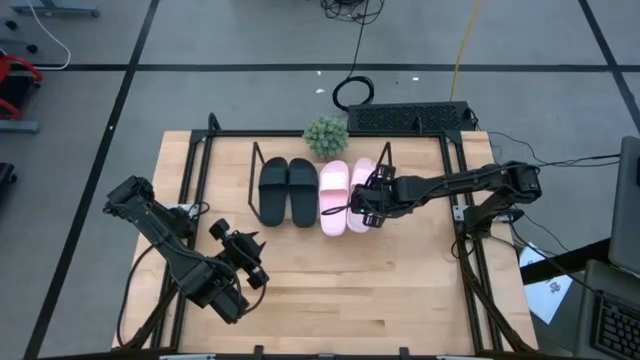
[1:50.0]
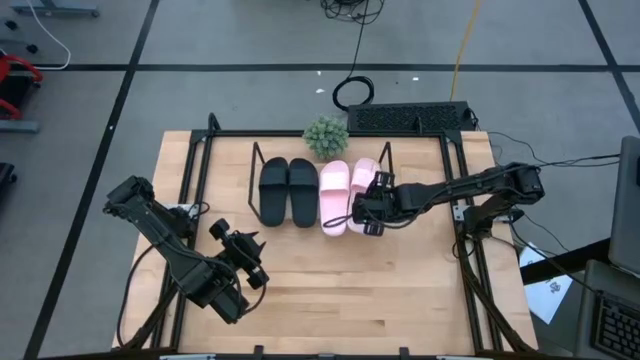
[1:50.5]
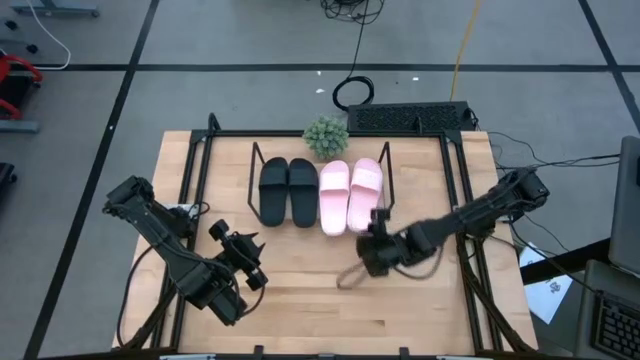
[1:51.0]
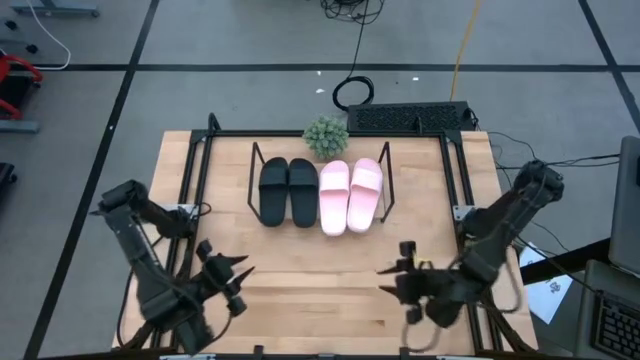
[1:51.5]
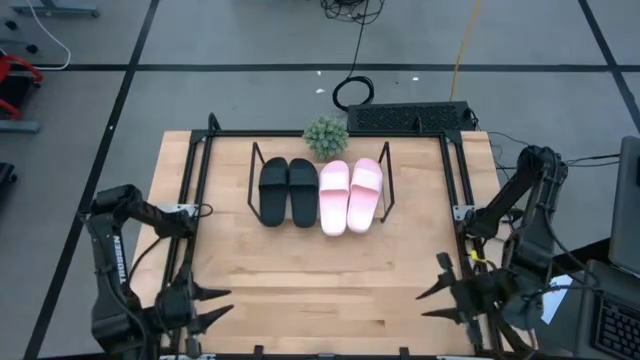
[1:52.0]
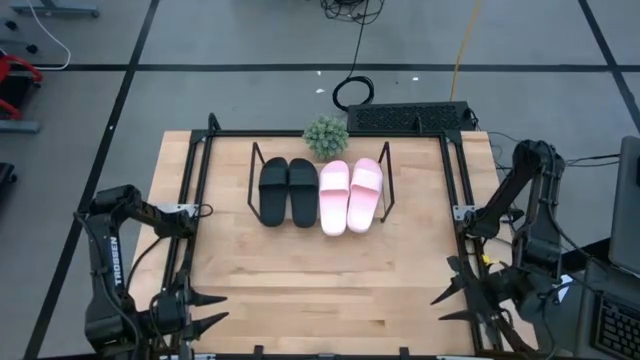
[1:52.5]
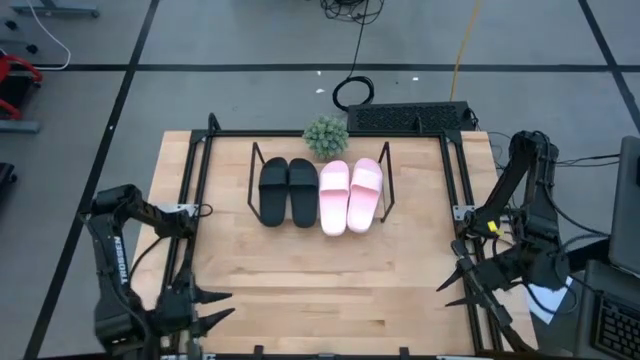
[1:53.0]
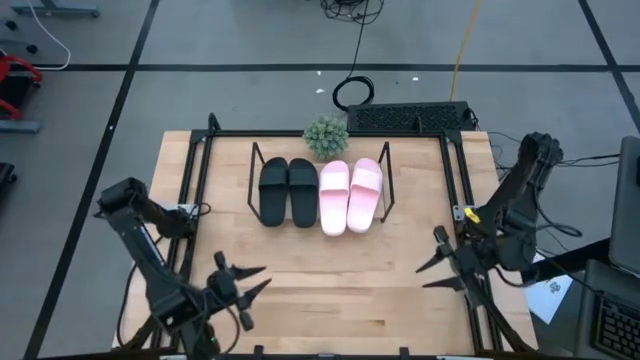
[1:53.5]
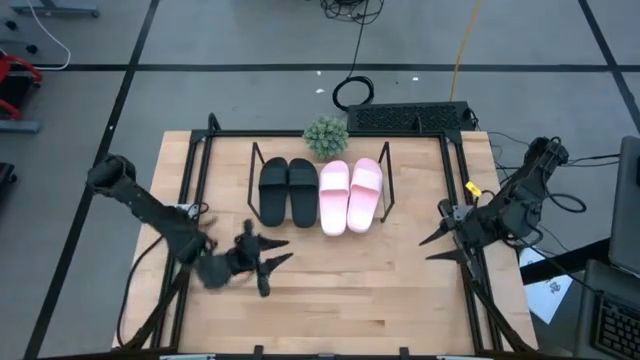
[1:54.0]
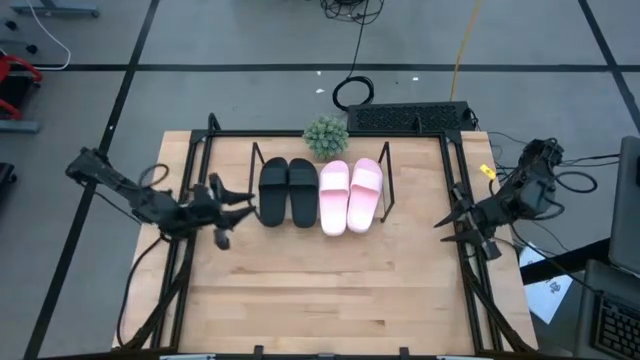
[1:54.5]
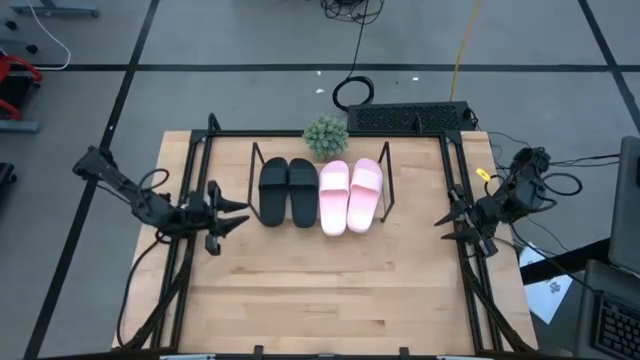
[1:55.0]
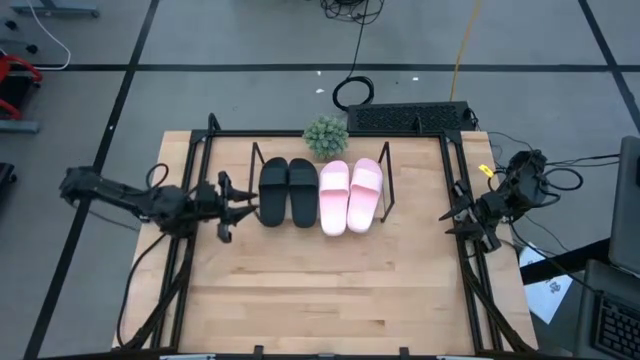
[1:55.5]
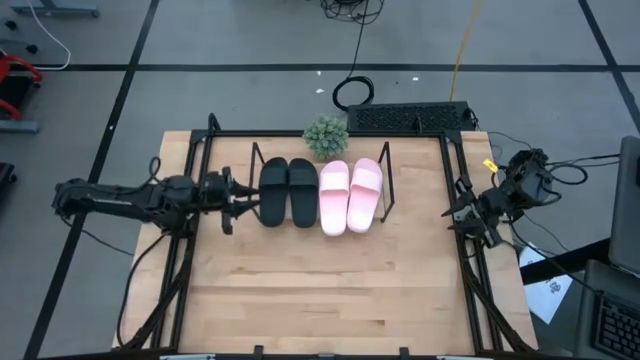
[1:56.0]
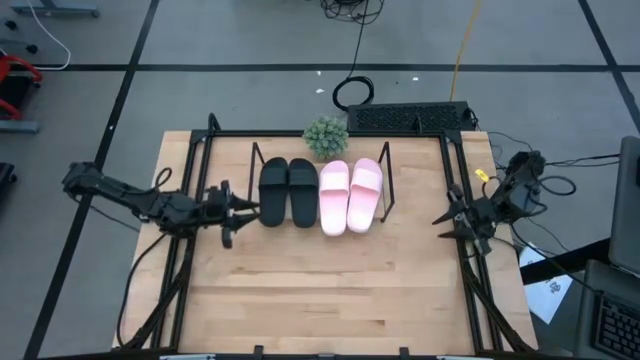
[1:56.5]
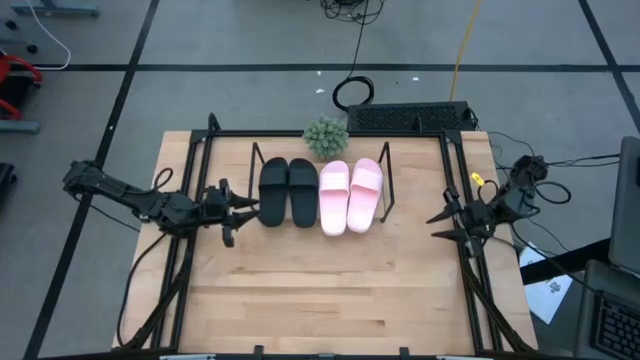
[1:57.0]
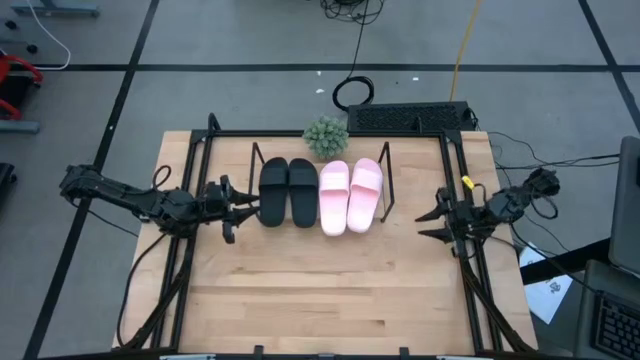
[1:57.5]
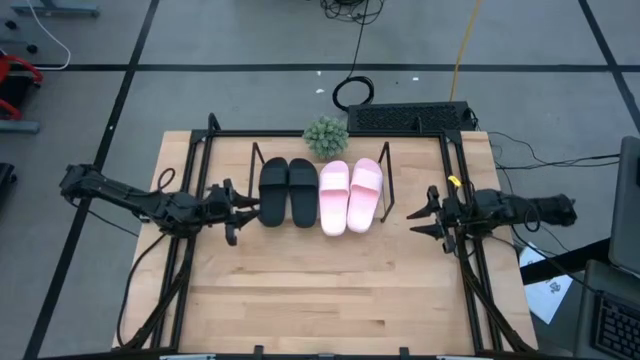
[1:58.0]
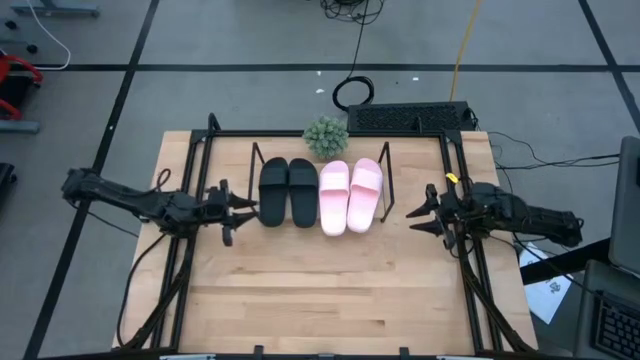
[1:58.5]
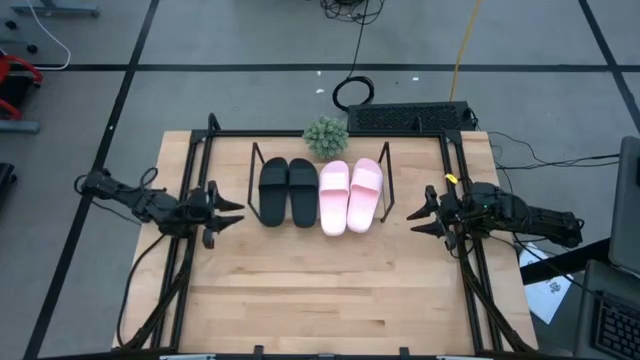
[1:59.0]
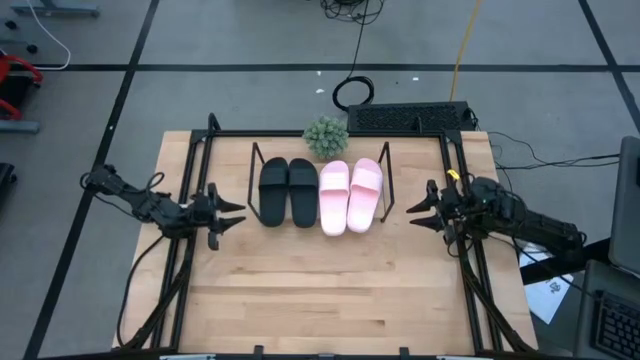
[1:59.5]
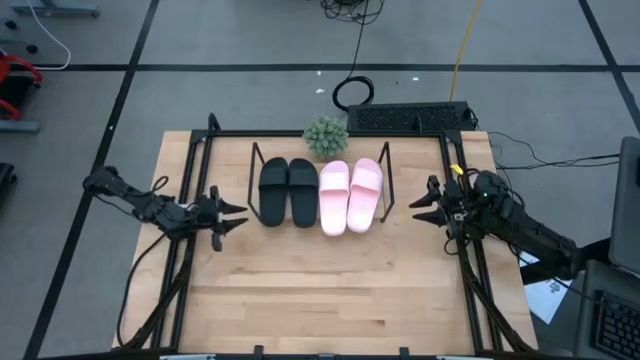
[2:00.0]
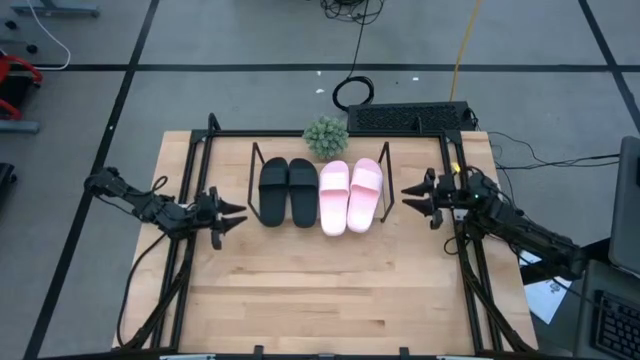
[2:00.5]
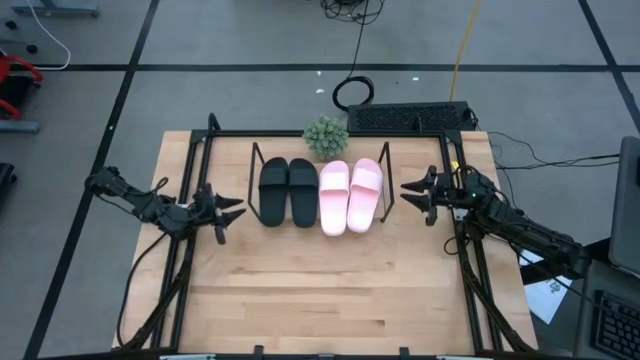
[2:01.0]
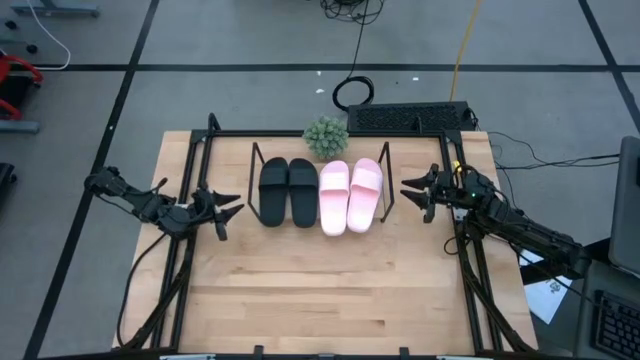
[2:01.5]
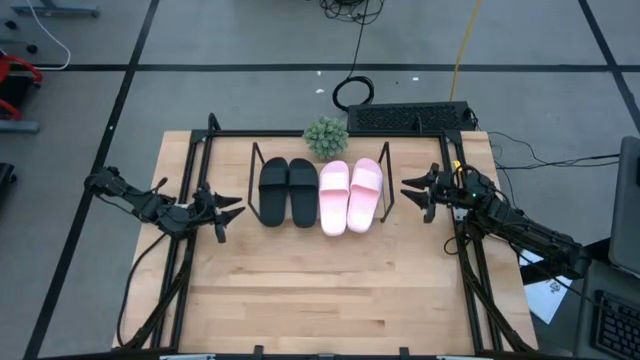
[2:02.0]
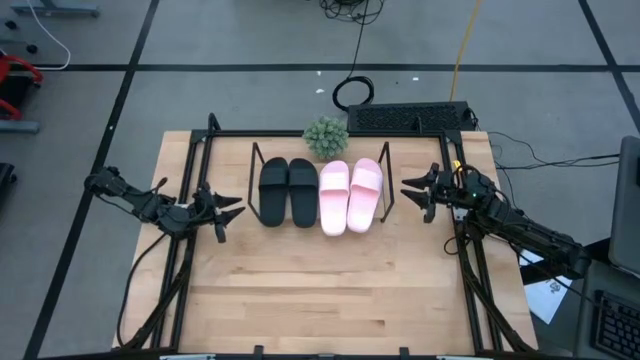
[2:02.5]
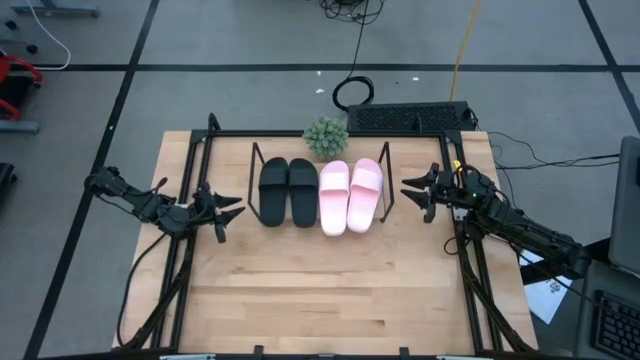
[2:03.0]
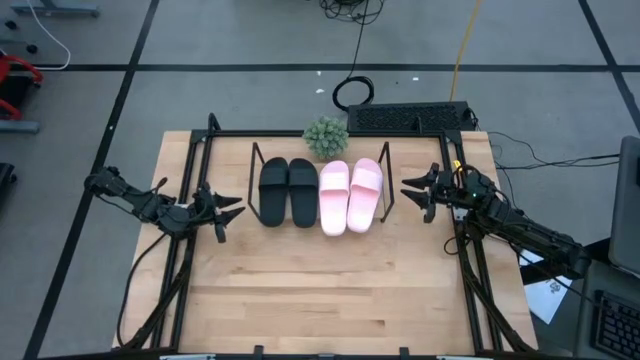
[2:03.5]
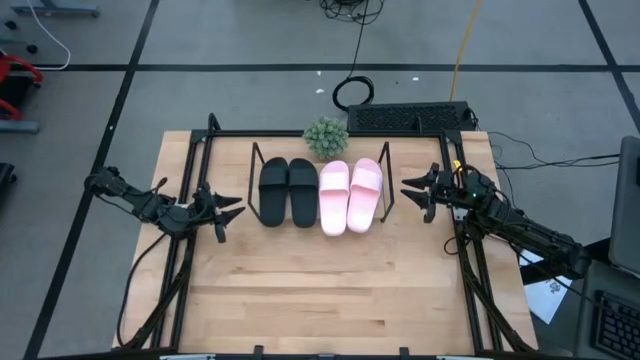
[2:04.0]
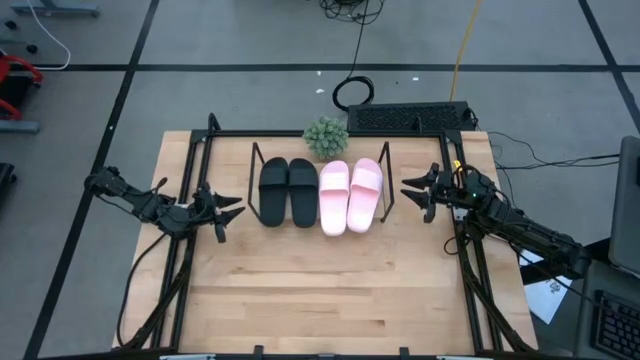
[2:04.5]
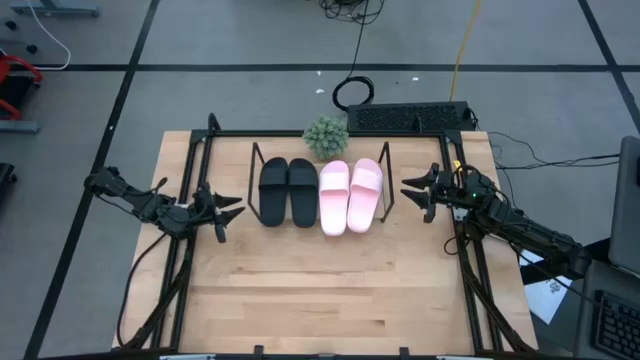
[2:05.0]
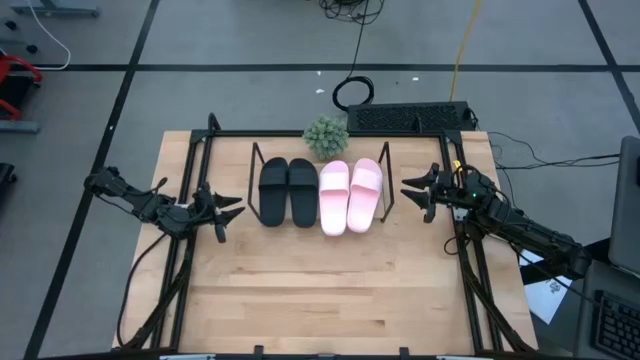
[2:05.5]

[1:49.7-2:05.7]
Task: Pick and place slides into the shelf
Return to Home Position
